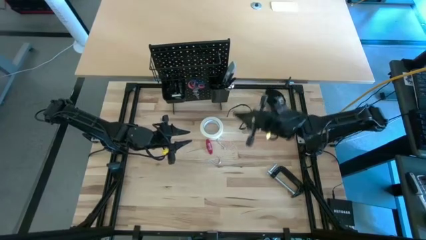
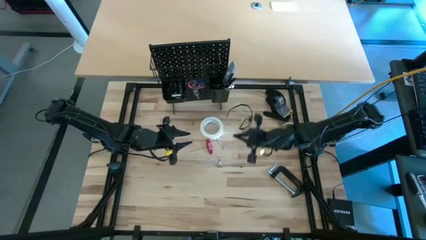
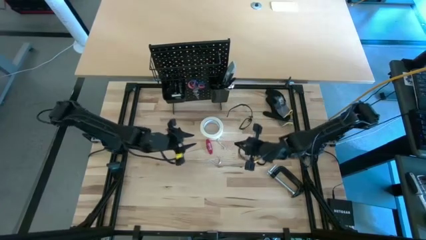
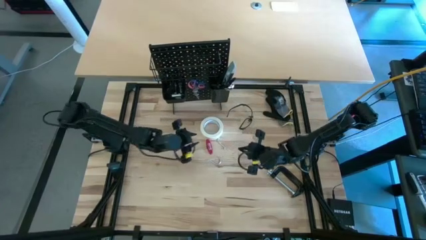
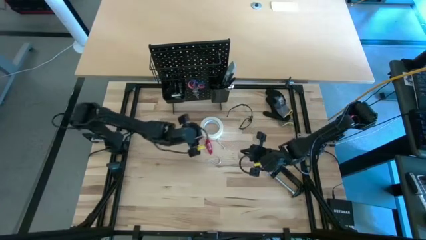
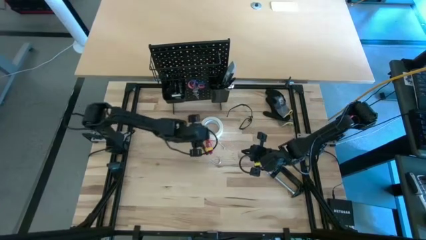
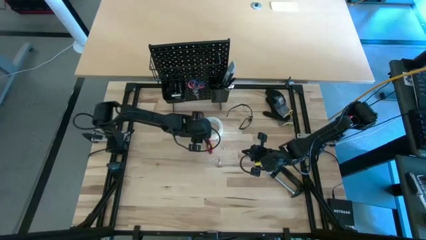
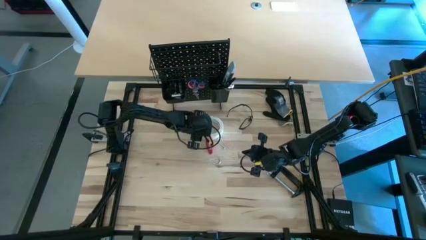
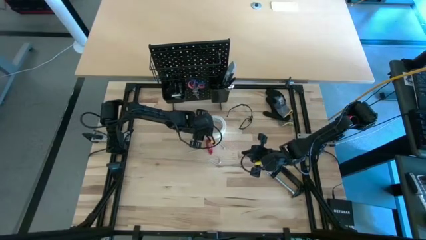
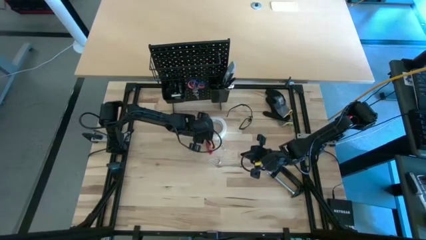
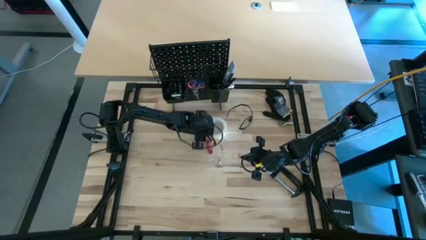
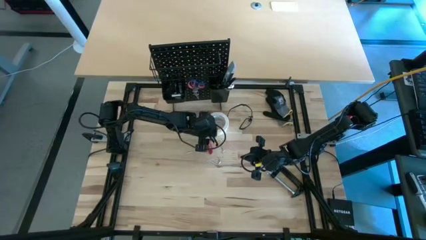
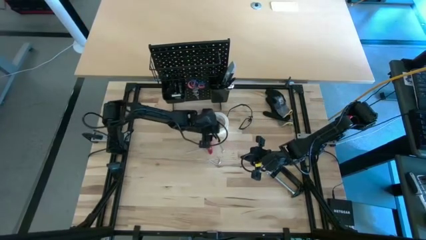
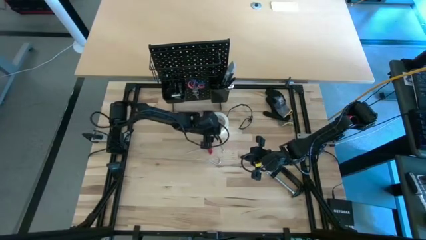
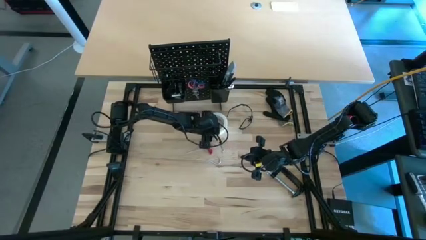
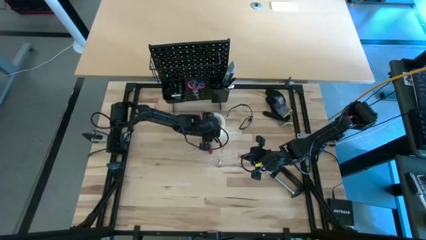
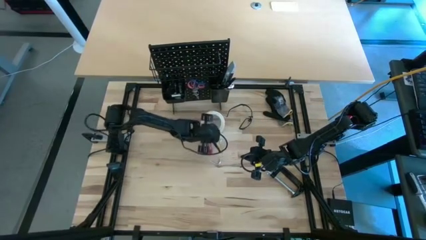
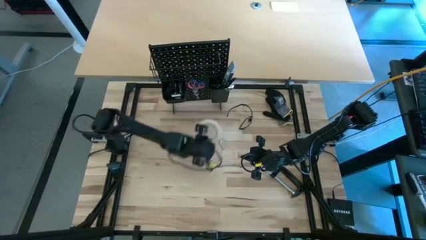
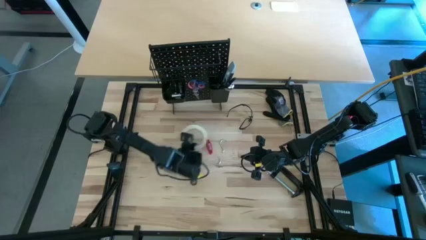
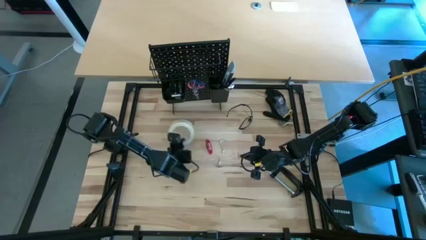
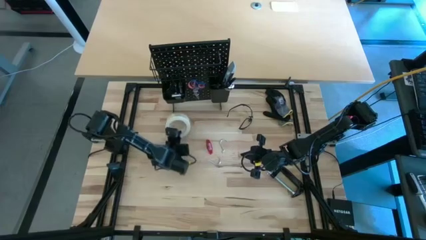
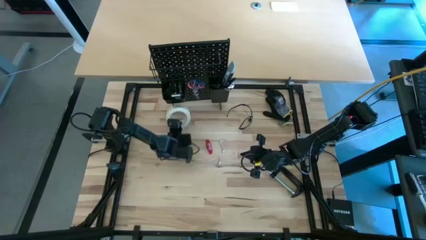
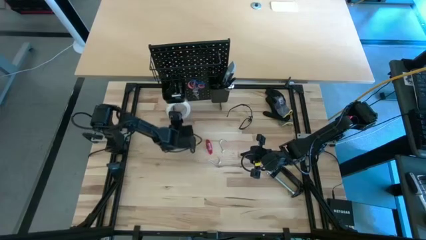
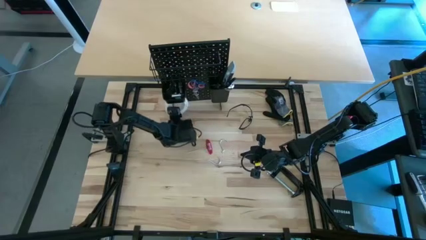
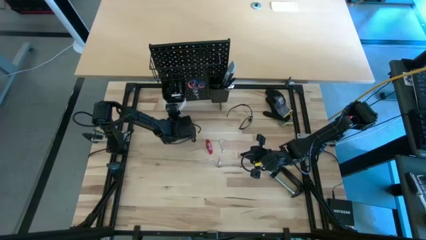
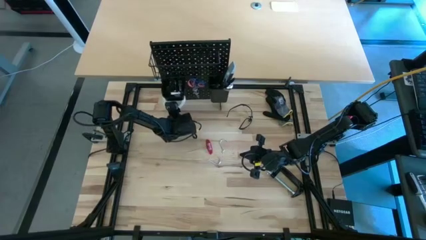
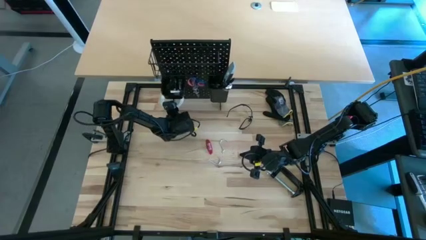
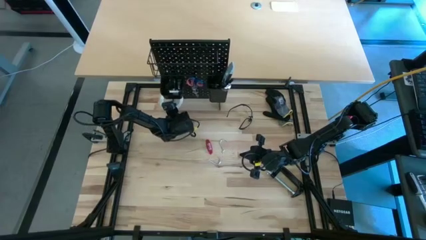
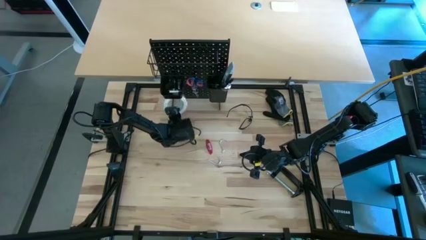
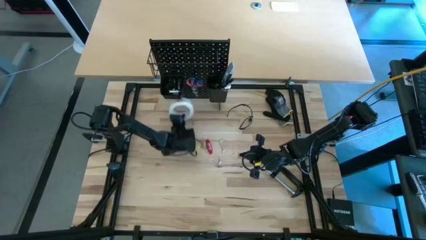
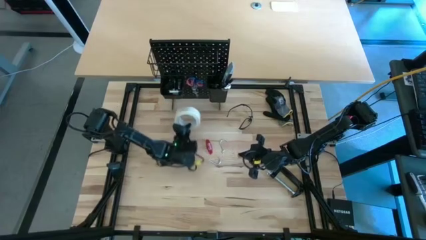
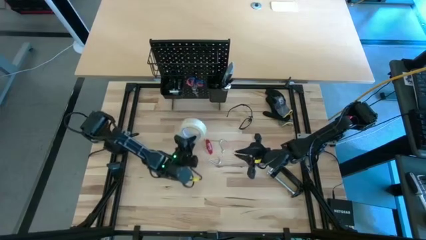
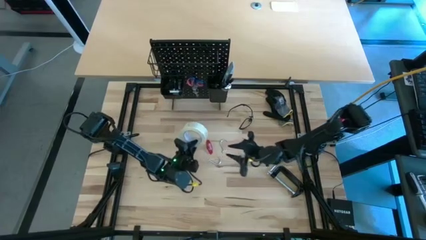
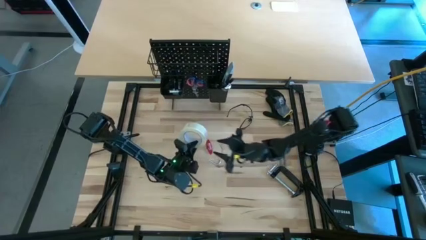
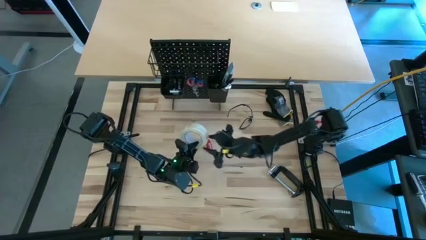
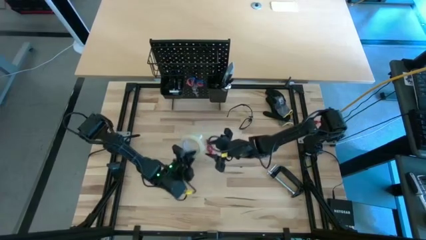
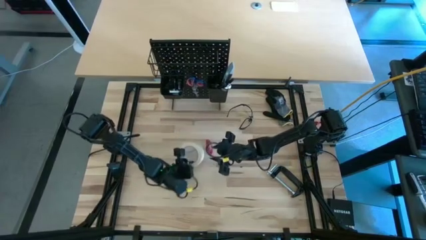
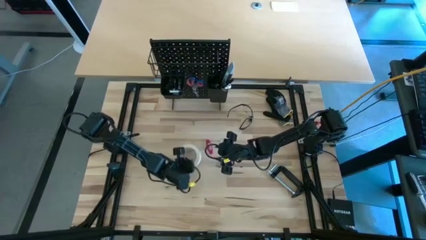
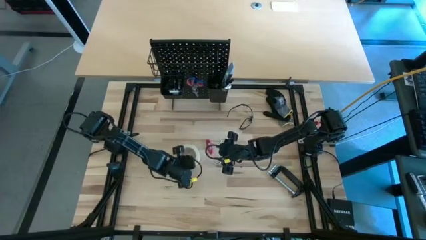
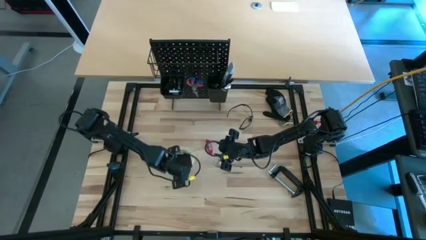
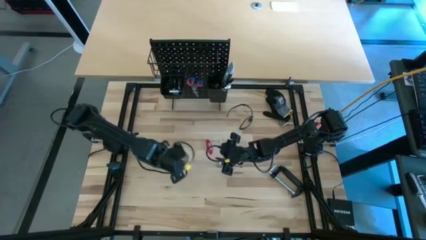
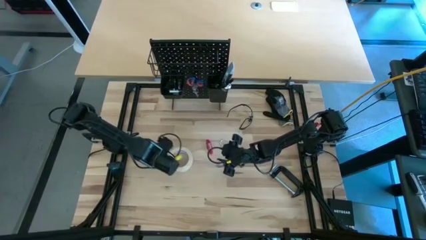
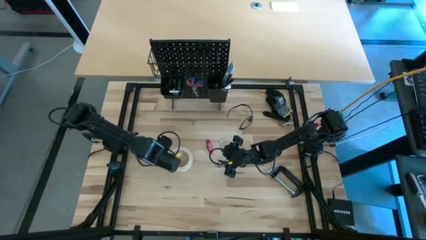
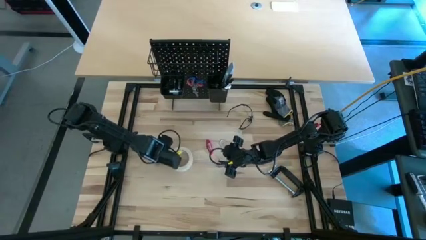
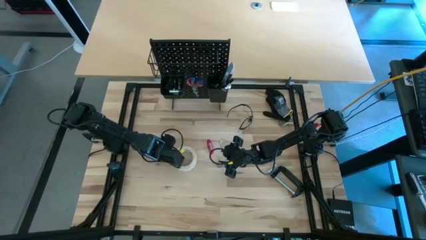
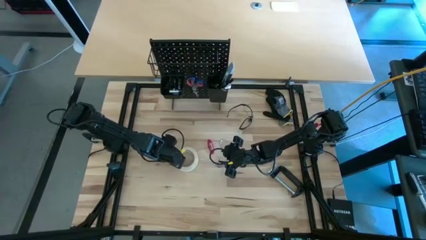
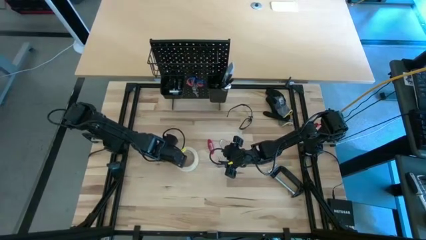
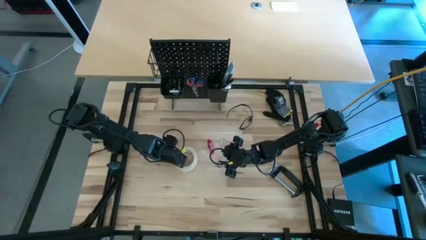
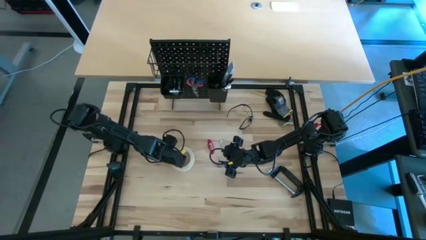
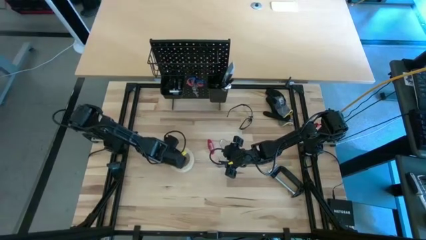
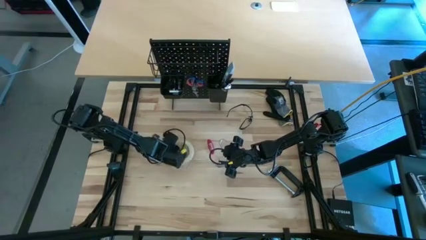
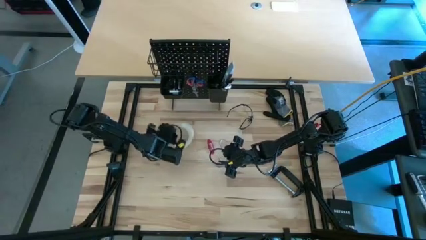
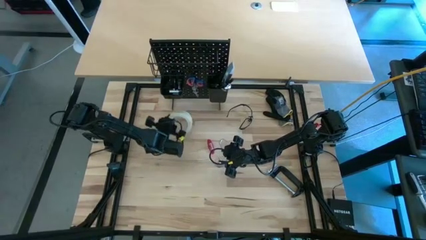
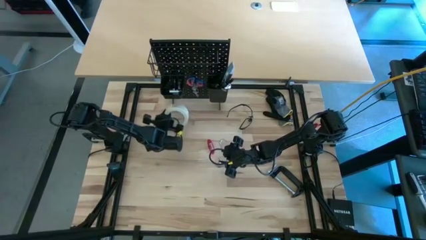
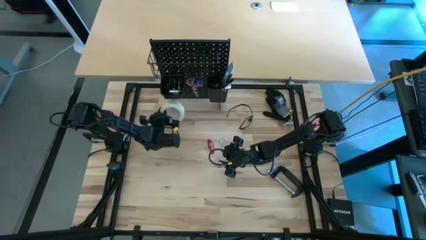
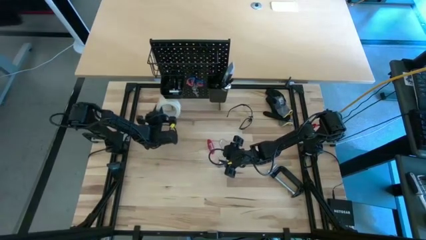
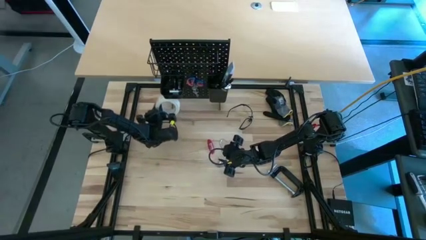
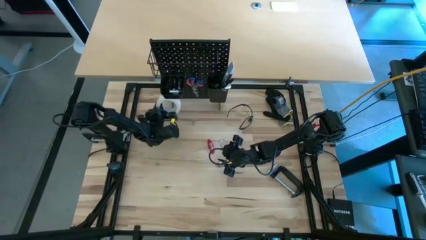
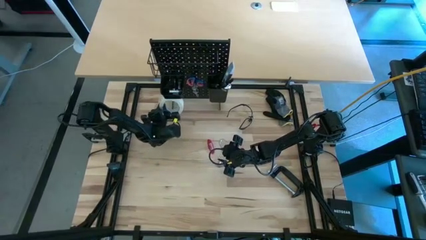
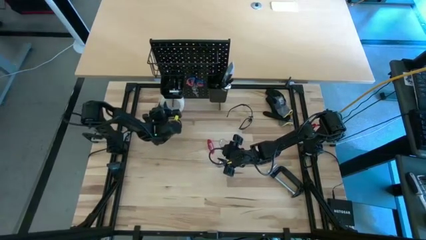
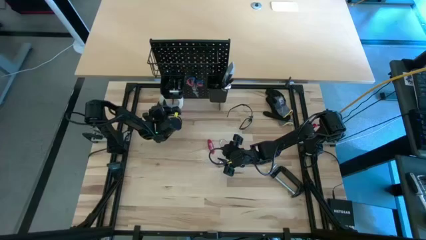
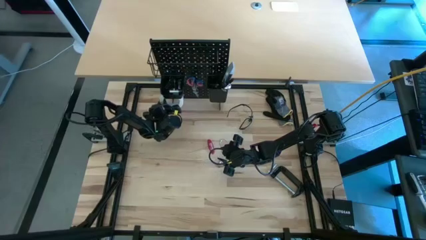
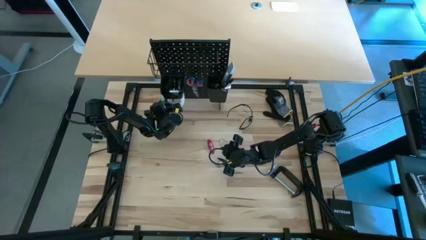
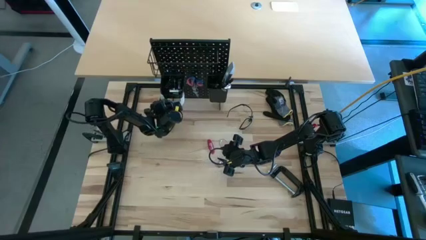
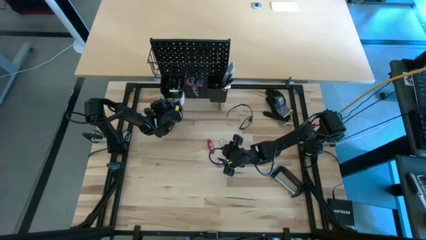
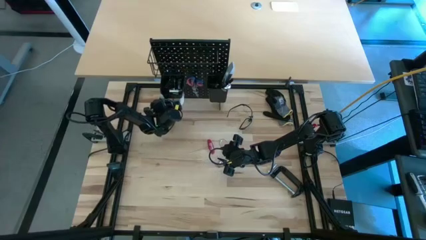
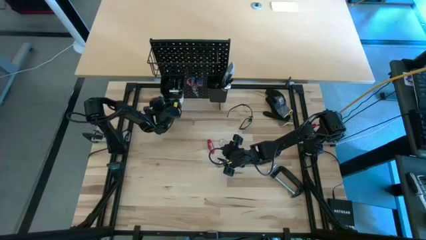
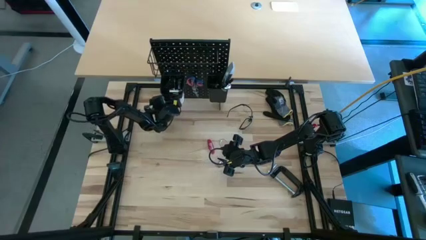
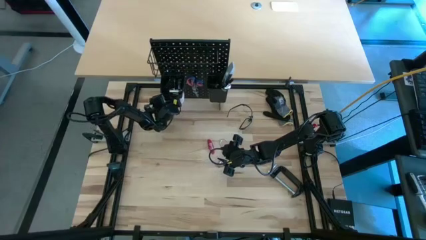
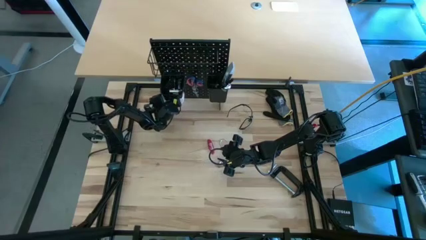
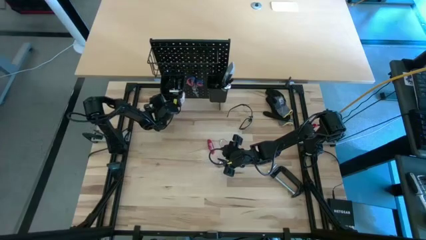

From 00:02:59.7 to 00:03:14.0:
Task: Hang tools onto peg board
Hang the white masking tape on the pegboard hook

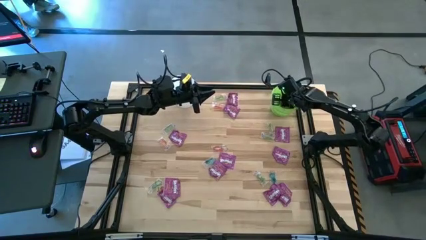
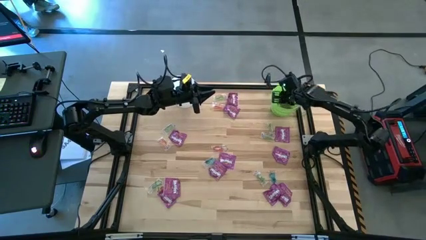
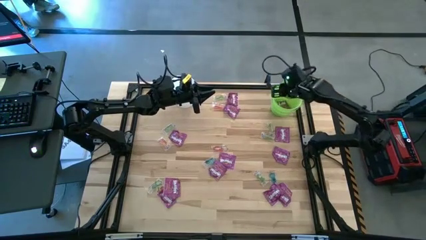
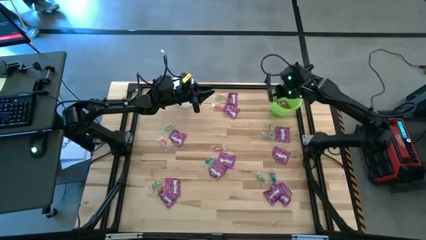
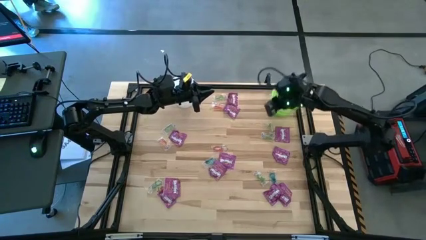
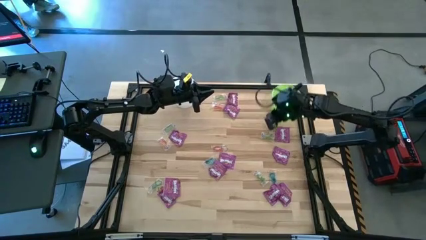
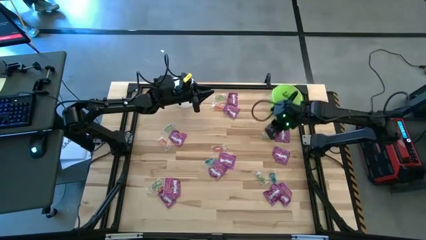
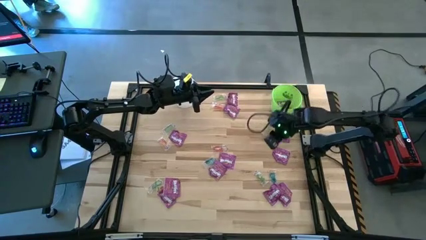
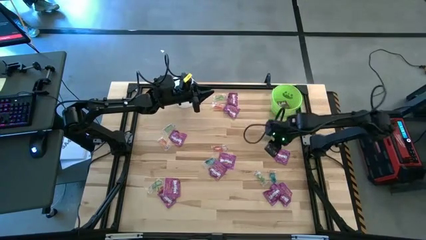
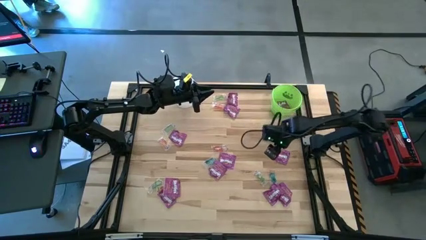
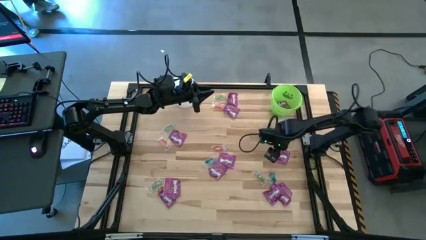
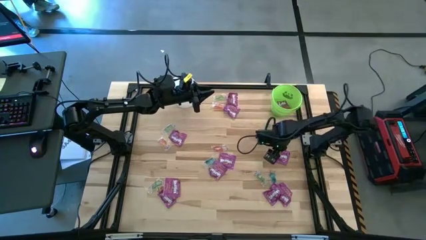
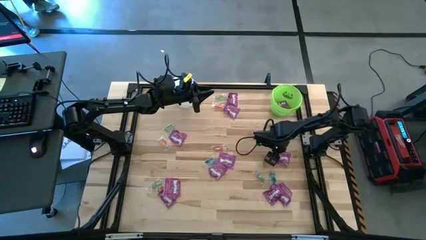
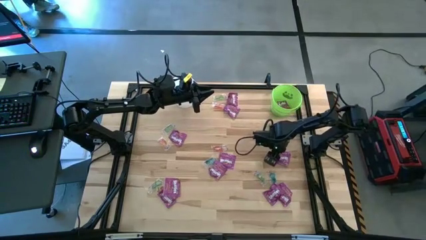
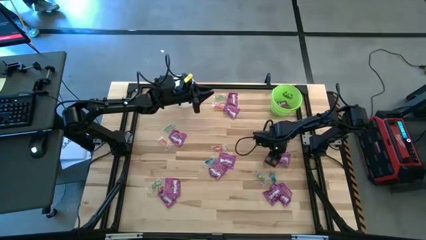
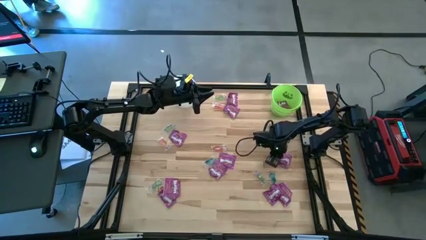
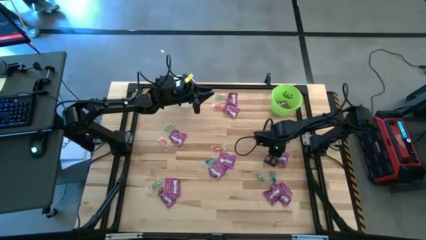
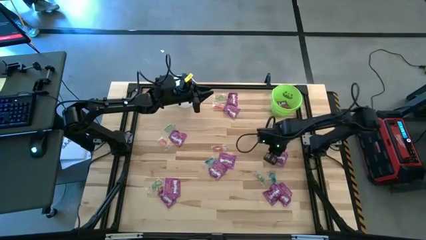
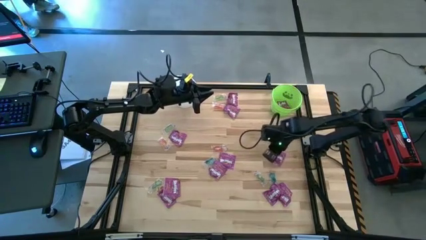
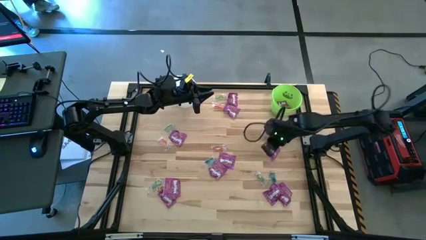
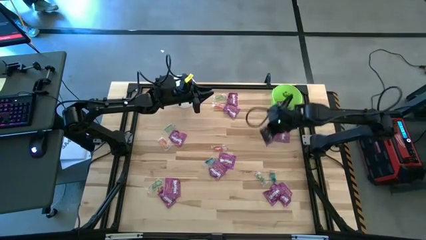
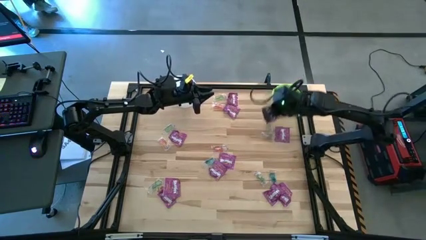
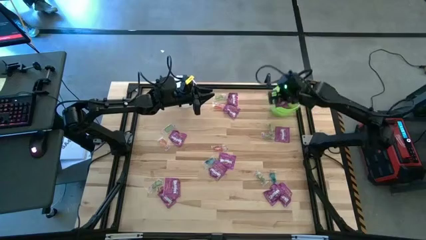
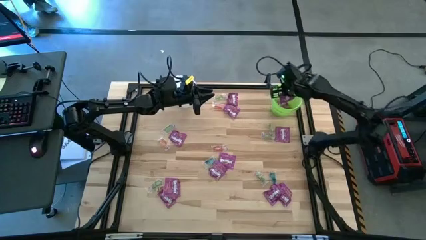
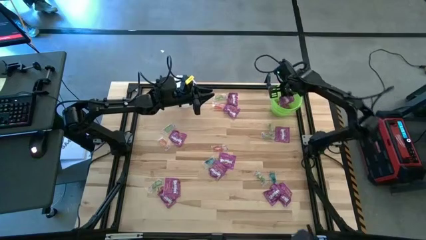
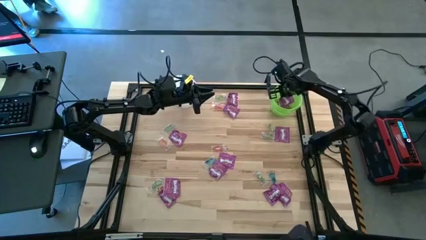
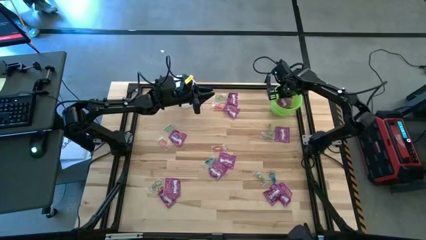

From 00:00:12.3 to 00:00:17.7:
Task: Sort candy by brand, put in halloween buckets
Put the violet candy into the green bucket
